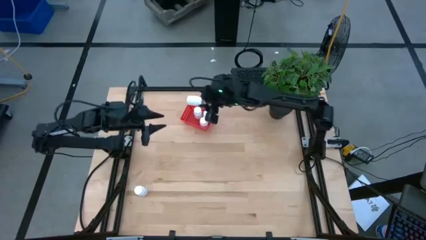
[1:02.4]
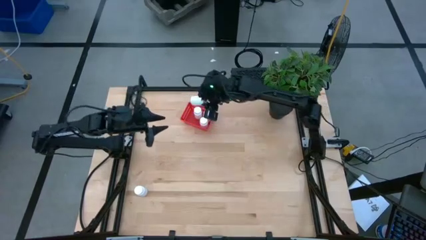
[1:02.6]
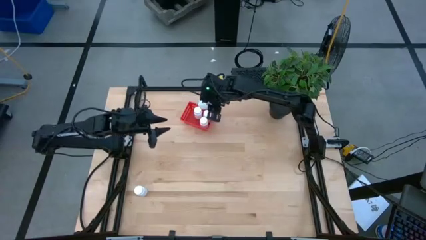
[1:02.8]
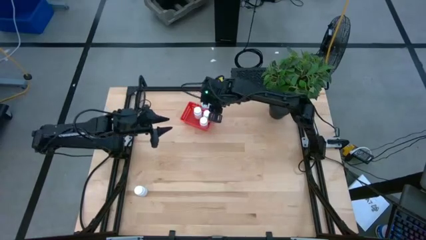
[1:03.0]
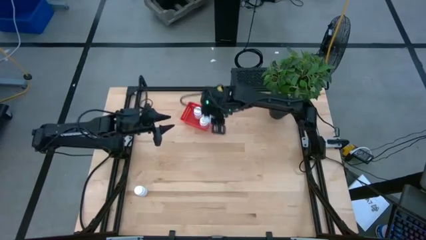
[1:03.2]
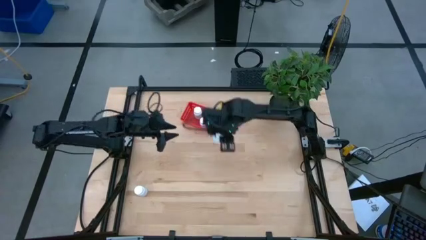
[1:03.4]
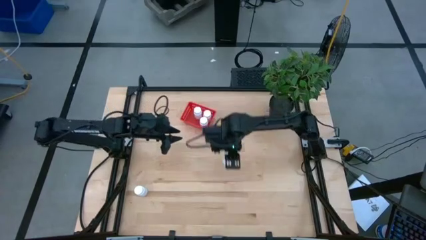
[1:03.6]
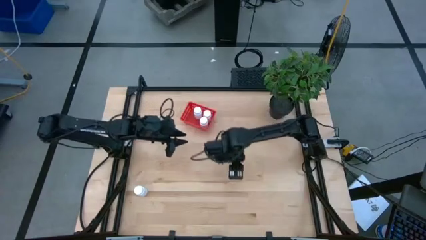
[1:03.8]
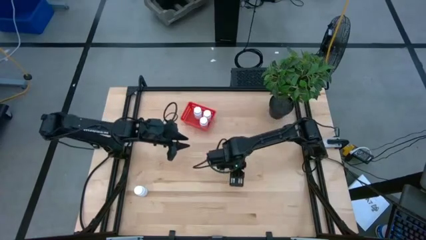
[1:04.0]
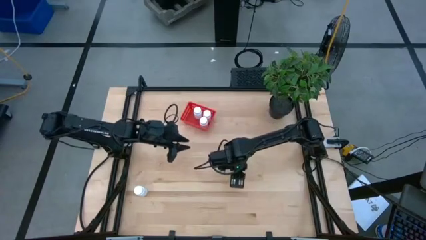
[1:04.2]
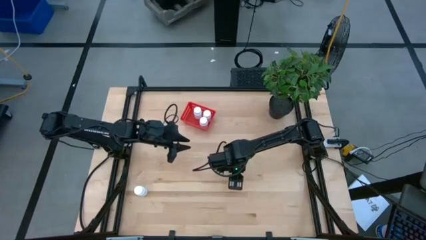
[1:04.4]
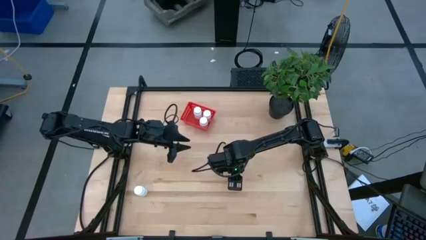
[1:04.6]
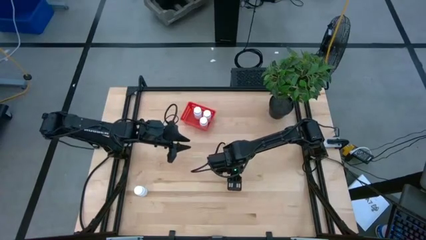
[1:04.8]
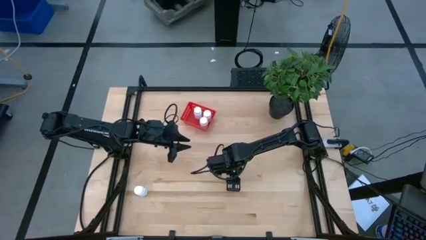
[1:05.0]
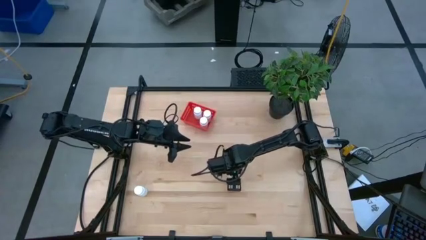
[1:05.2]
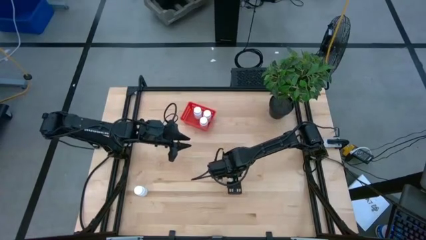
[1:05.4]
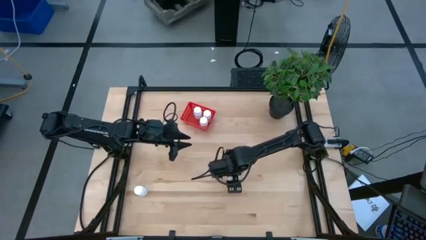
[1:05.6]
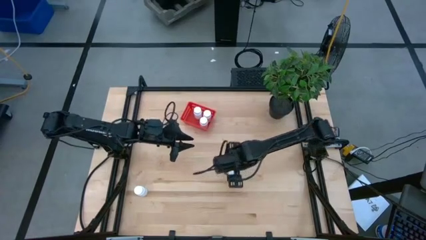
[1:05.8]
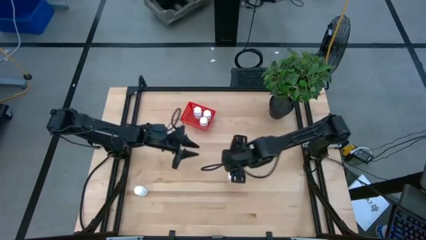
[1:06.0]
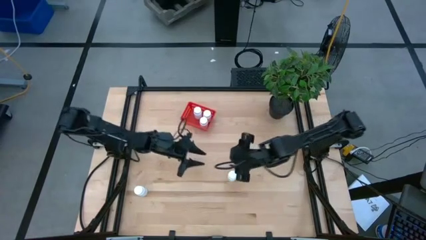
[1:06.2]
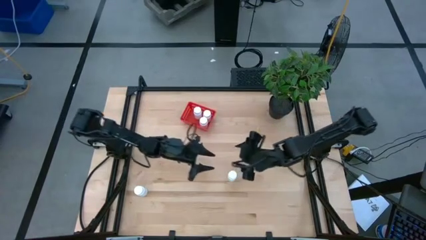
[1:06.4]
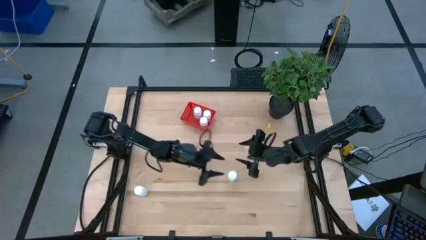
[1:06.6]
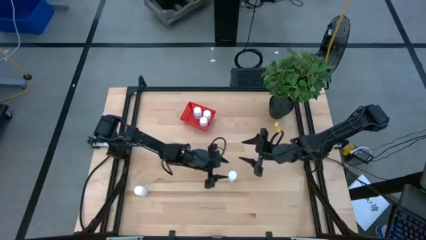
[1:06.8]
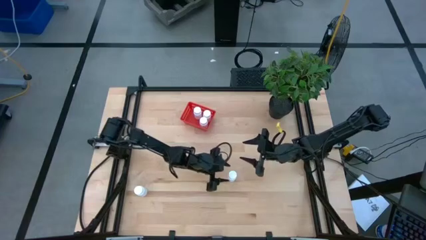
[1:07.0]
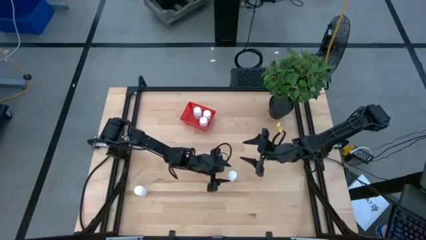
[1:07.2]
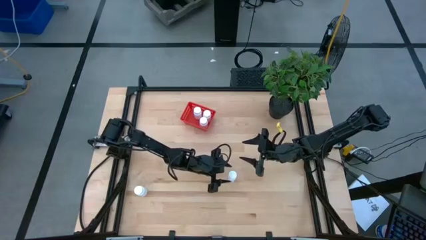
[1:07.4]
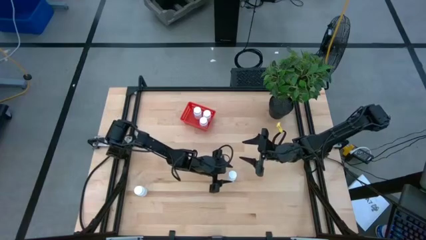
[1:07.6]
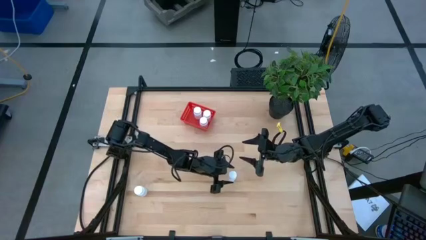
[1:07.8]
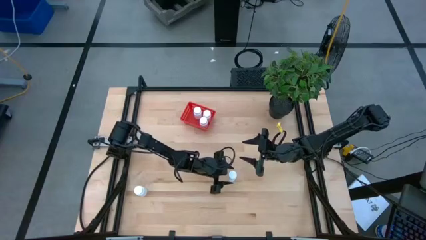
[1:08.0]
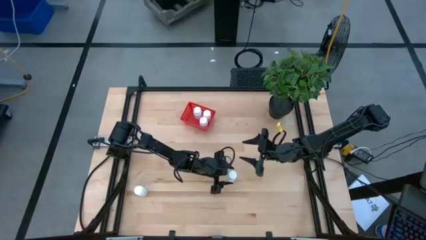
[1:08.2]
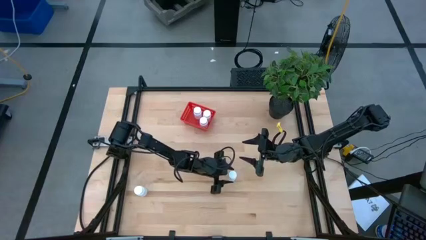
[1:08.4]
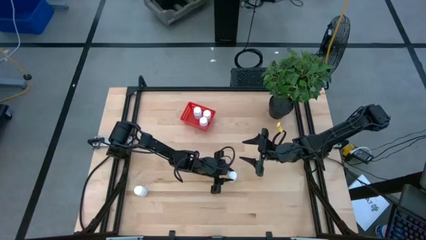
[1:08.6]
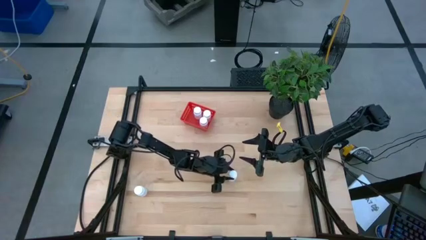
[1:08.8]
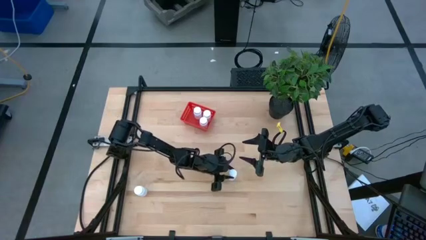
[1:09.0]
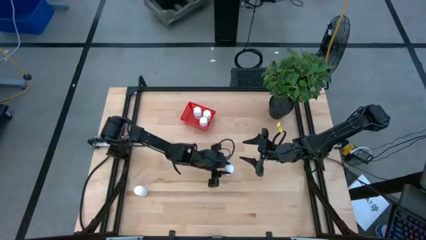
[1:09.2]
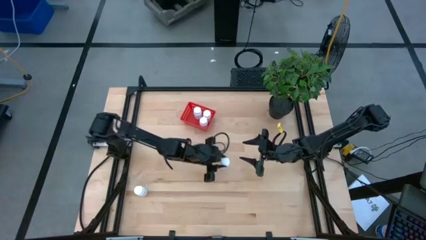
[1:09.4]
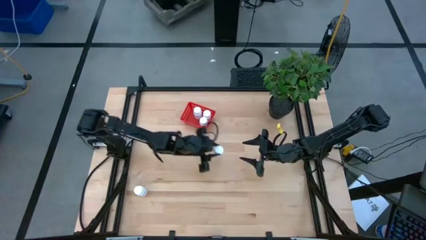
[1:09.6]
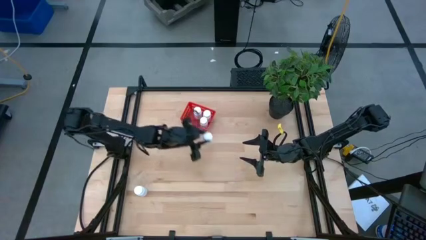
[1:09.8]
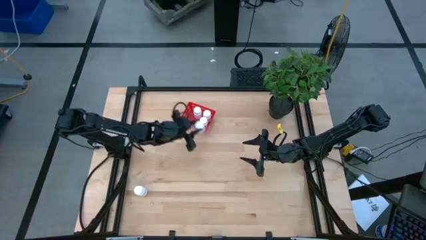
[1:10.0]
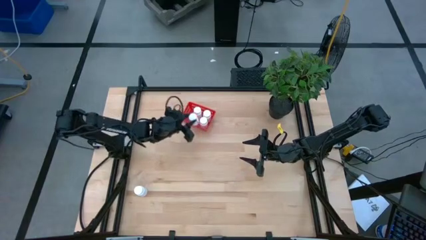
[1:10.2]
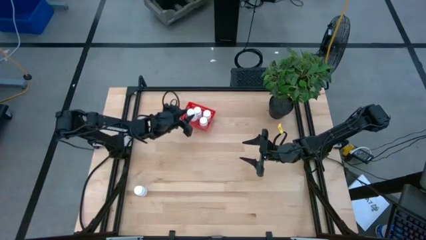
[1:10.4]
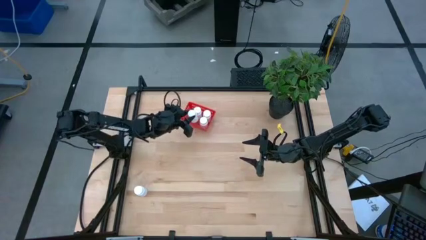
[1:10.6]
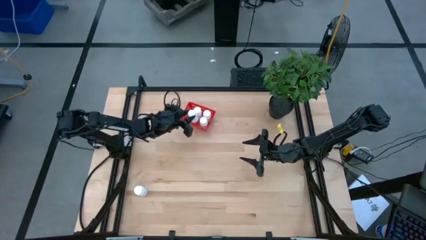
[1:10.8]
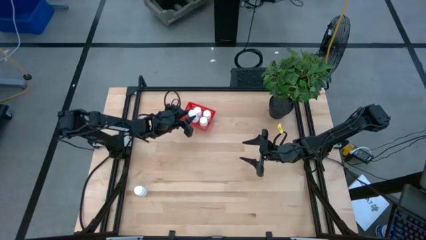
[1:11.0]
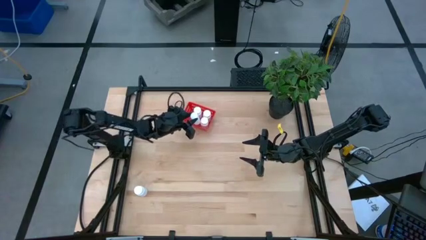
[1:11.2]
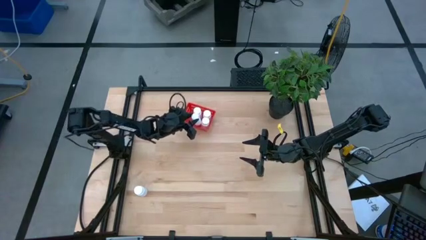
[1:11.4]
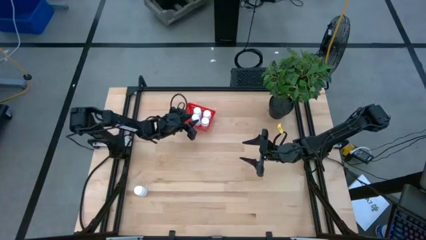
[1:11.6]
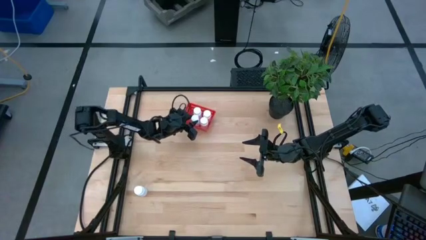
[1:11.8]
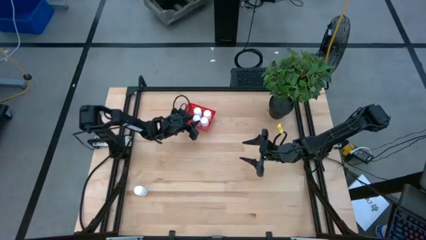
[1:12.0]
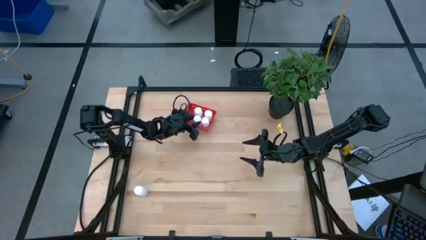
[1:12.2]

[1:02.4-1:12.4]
Task: Pick and place pill bottles into a basket
Put the white pill bottle into the orange basket

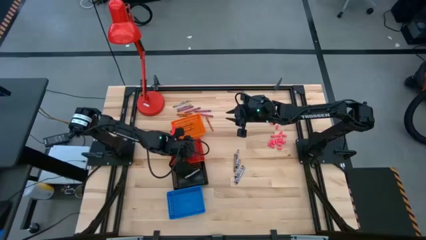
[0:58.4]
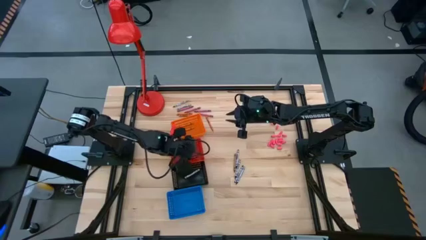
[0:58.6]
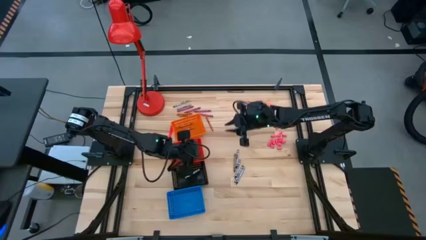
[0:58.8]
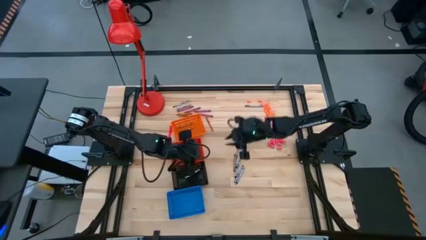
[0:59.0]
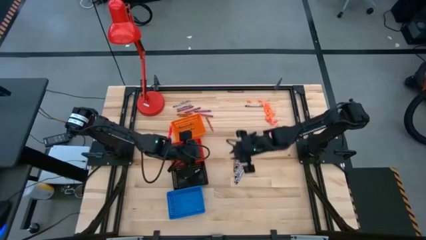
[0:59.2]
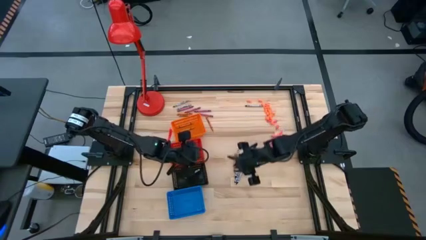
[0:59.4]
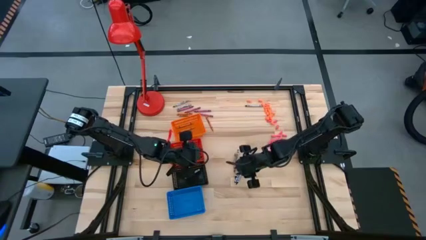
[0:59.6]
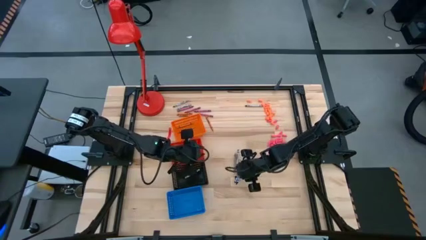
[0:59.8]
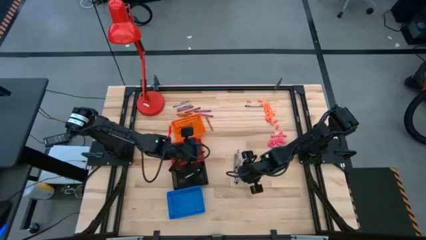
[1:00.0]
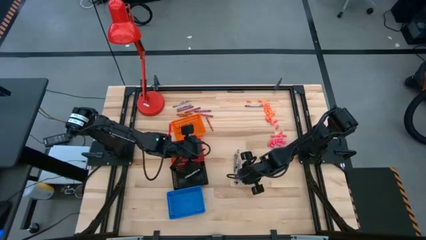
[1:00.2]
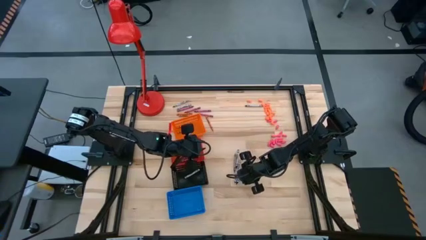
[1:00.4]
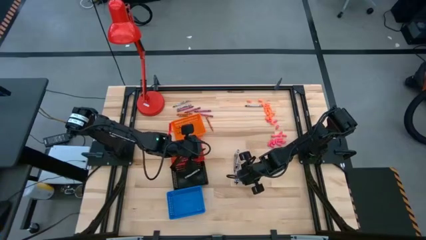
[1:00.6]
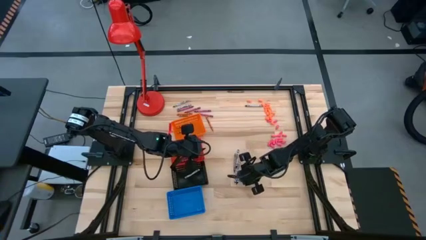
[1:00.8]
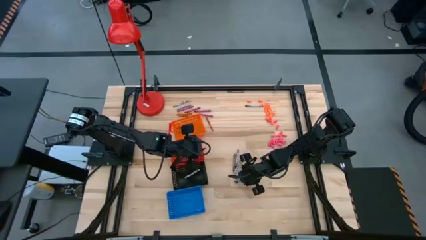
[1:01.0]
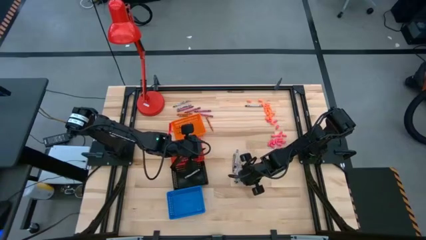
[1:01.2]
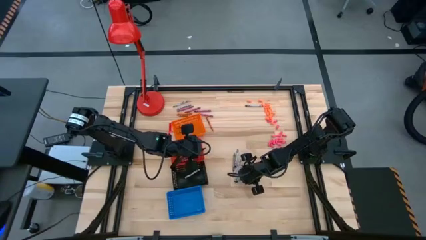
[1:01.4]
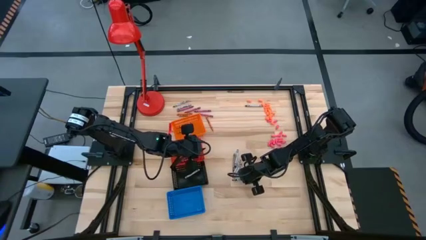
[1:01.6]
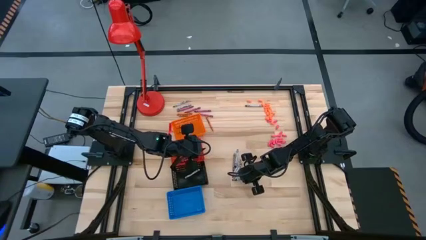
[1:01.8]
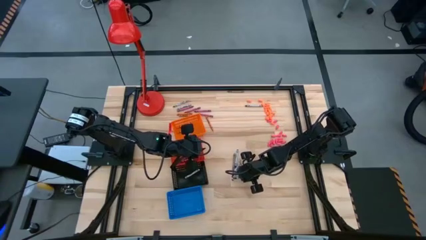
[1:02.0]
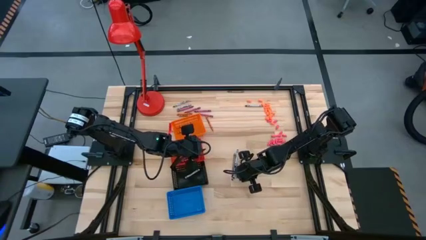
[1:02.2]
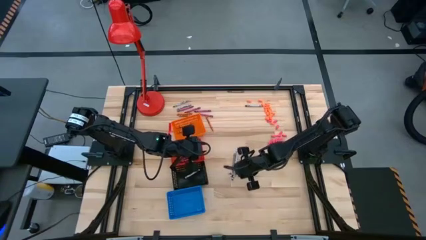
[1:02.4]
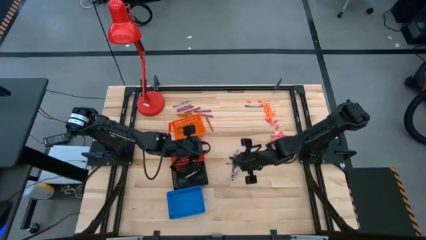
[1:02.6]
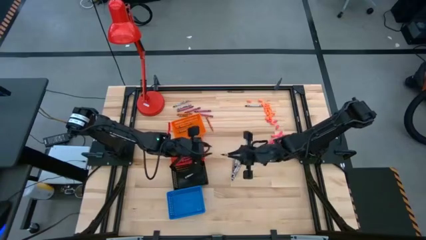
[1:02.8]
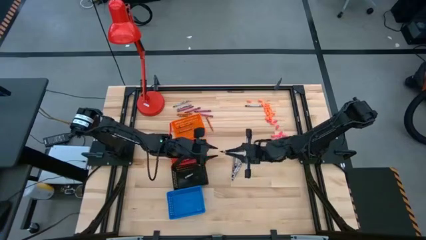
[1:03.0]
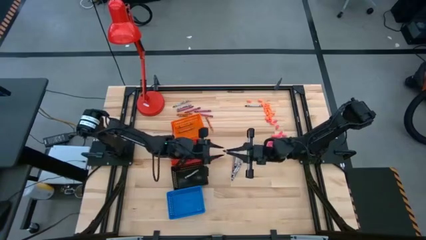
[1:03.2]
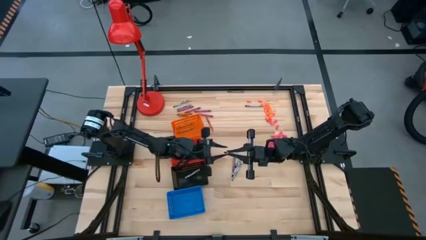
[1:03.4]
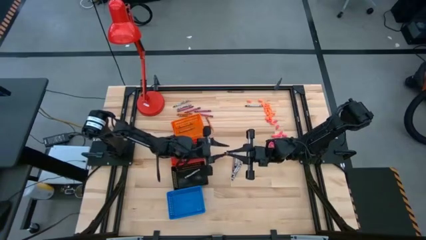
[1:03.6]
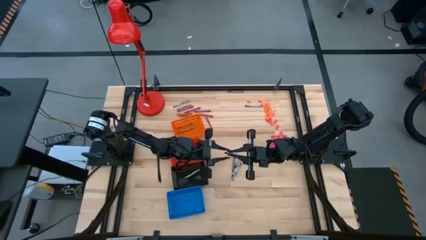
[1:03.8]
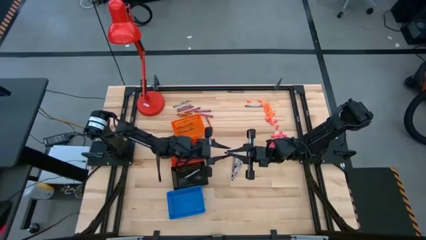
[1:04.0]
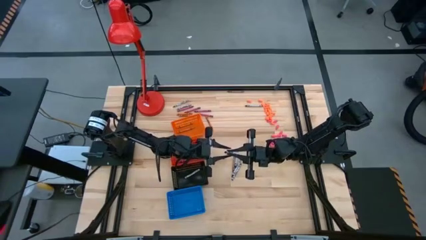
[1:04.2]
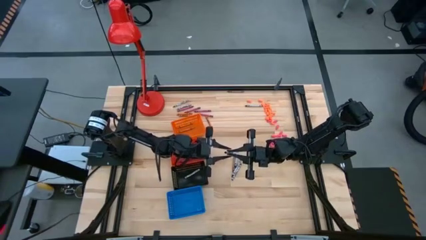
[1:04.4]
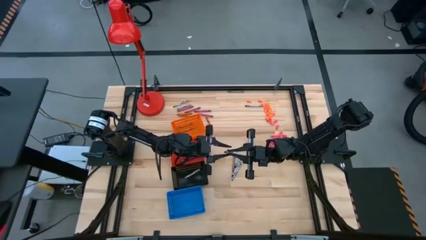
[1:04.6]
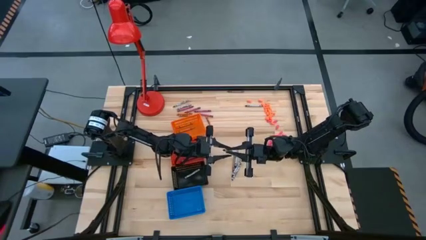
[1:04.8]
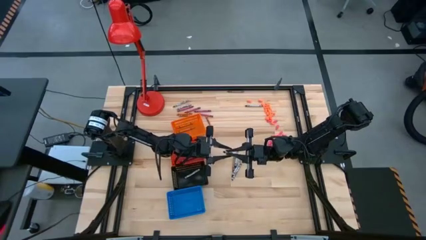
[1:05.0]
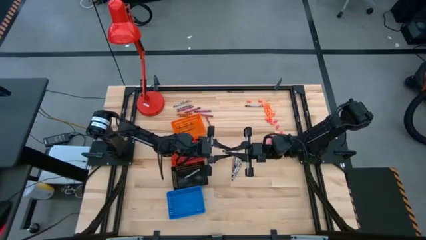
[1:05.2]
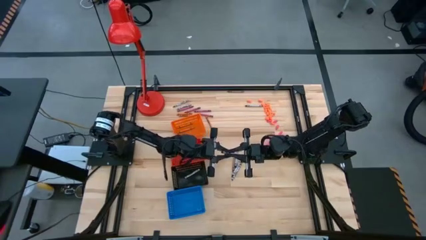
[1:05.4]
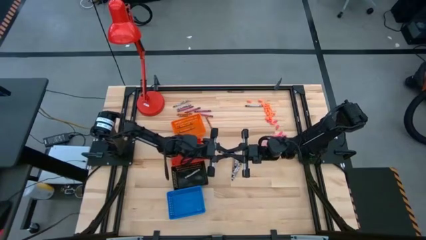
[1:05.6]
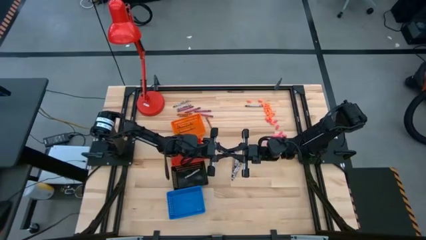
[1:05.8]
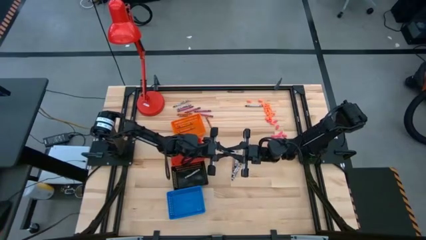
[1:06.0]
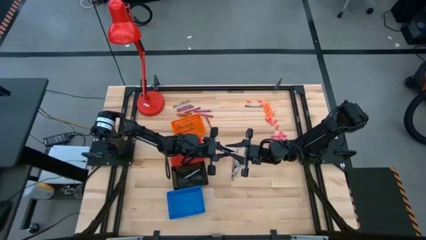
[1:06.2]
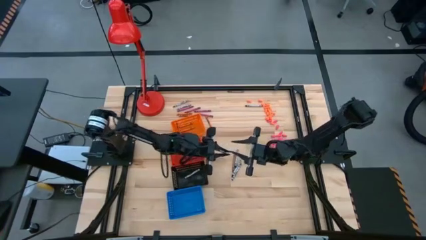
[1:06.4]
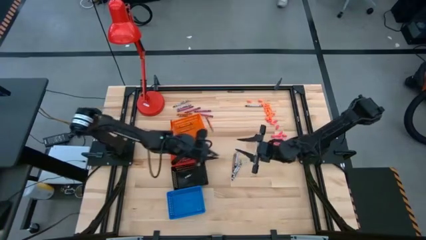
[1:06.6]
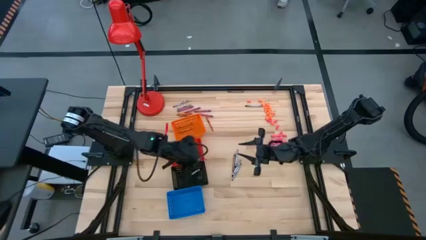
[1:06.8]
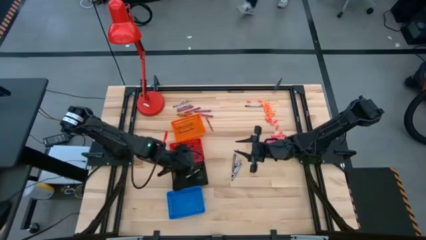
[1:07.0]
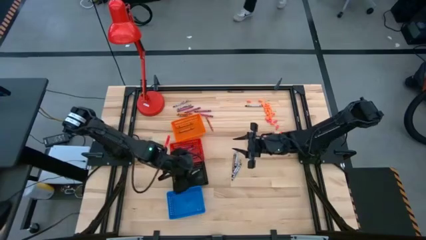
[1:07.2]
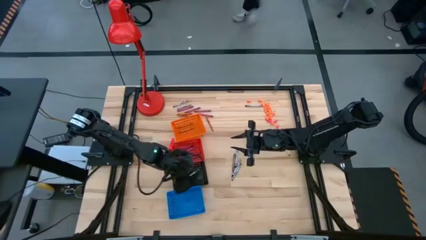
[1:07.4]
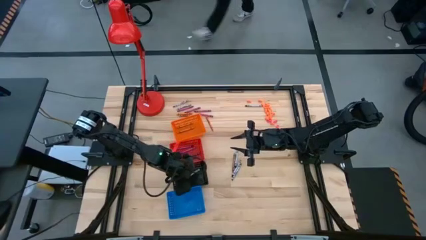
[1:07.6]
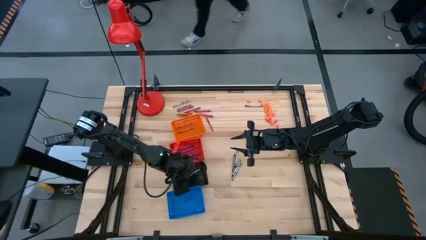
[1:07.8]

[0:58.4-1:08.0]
Task: Sort crayons
Put the black crayon into the black basket
